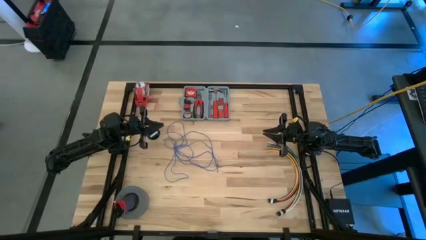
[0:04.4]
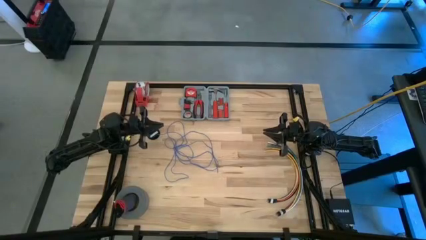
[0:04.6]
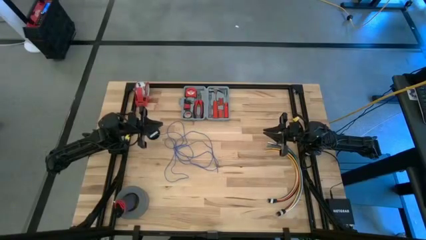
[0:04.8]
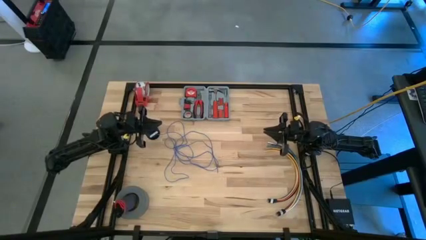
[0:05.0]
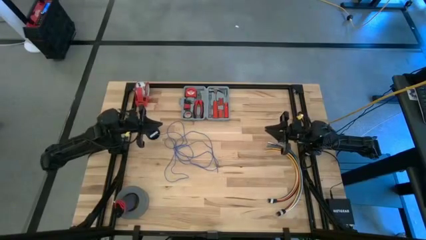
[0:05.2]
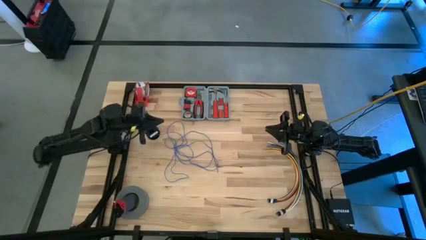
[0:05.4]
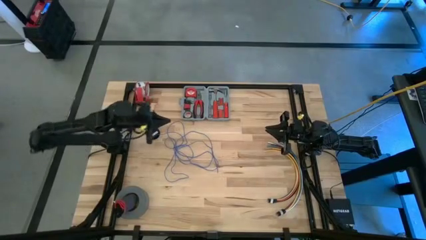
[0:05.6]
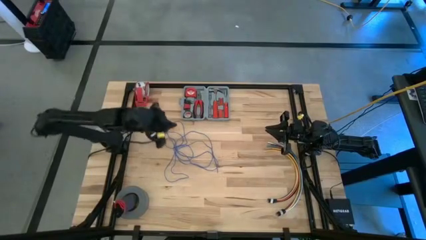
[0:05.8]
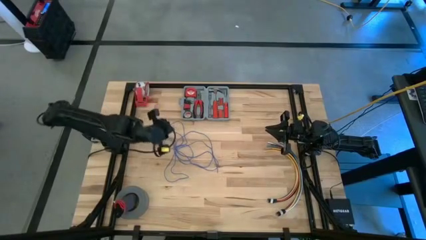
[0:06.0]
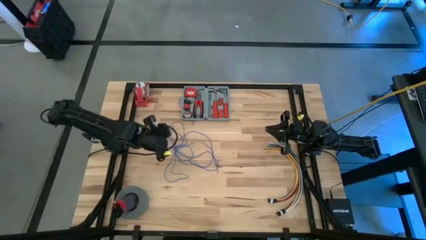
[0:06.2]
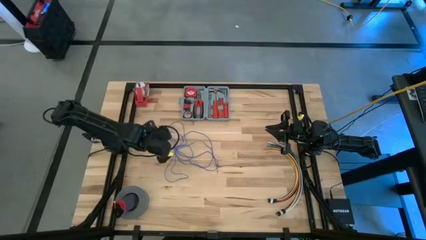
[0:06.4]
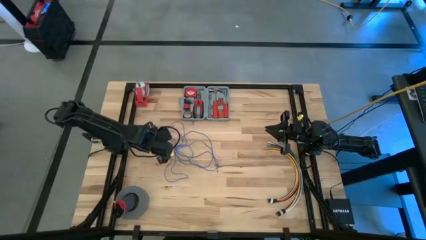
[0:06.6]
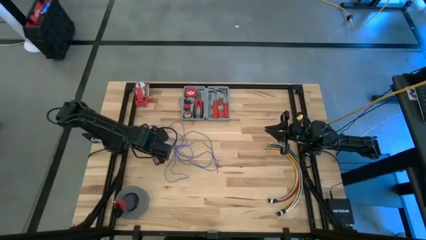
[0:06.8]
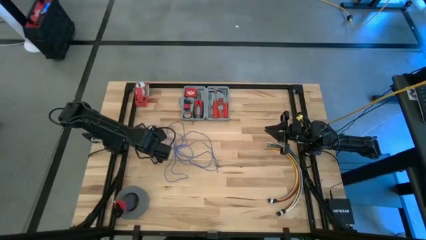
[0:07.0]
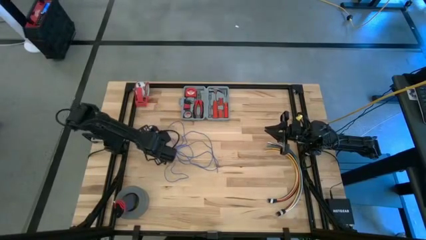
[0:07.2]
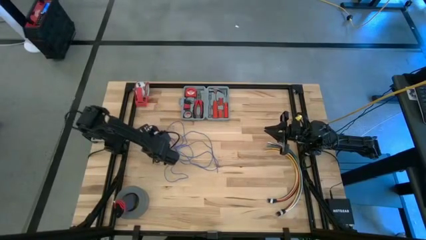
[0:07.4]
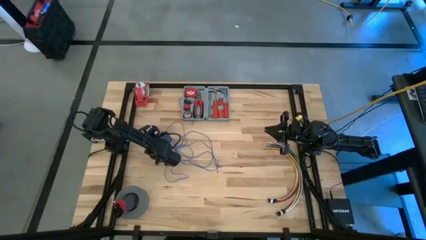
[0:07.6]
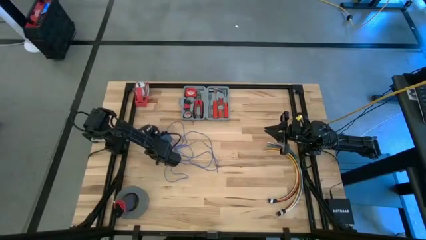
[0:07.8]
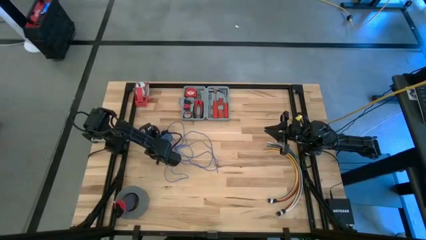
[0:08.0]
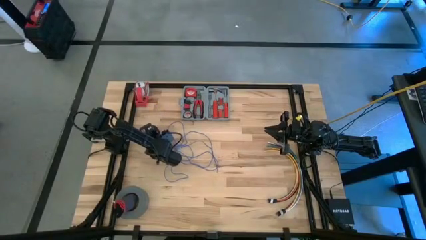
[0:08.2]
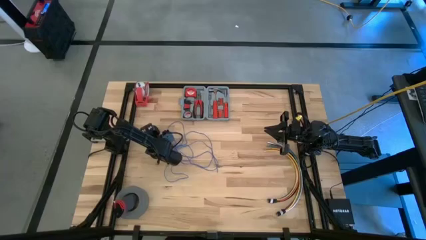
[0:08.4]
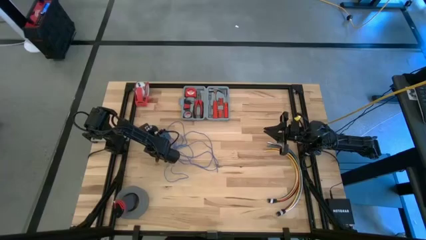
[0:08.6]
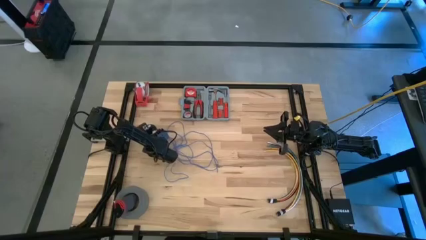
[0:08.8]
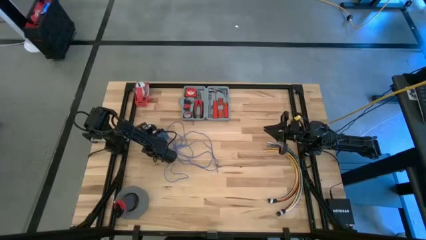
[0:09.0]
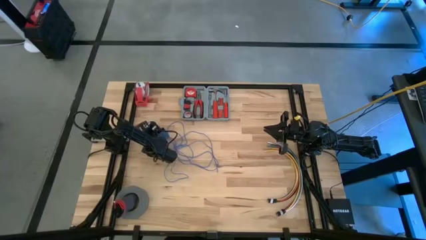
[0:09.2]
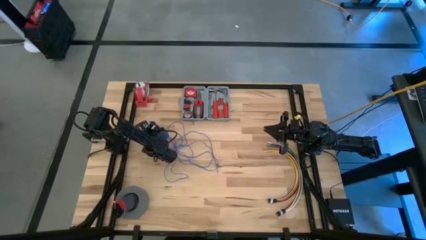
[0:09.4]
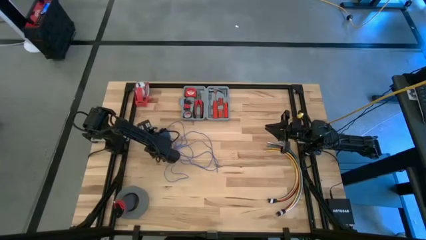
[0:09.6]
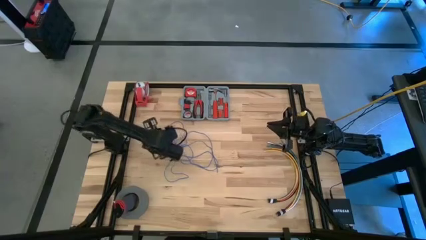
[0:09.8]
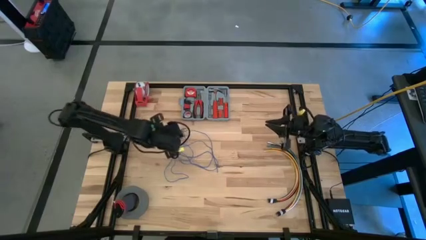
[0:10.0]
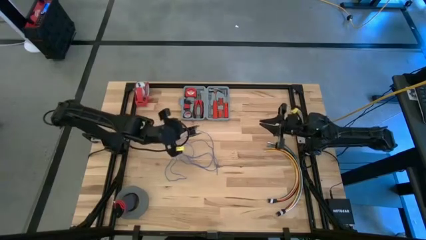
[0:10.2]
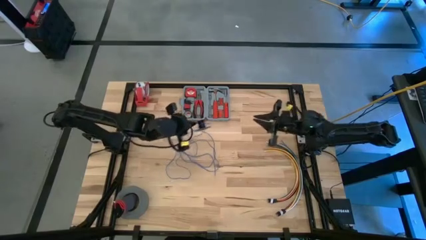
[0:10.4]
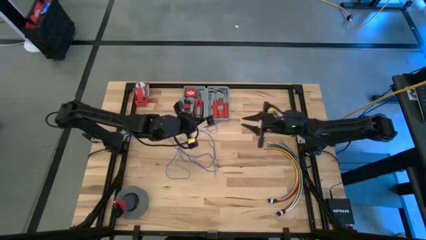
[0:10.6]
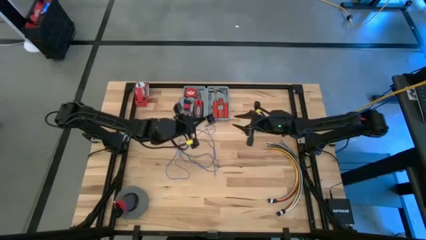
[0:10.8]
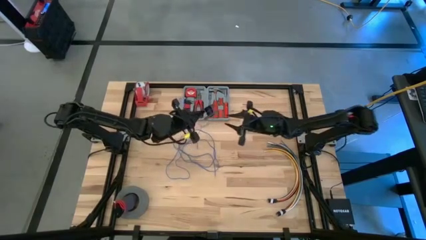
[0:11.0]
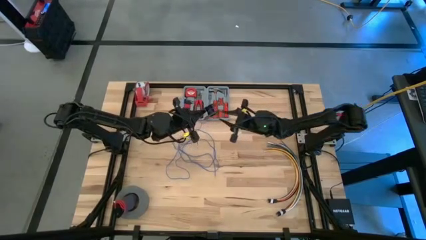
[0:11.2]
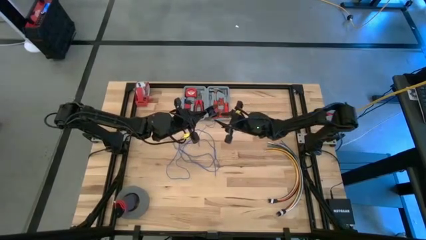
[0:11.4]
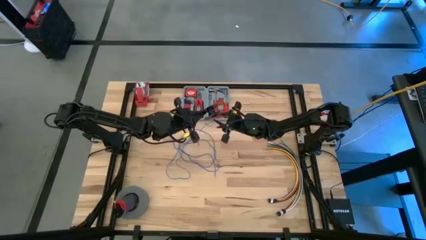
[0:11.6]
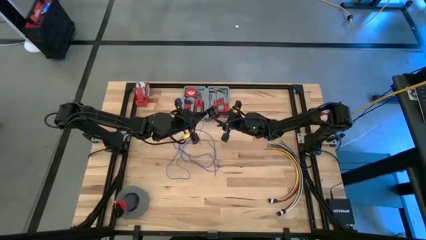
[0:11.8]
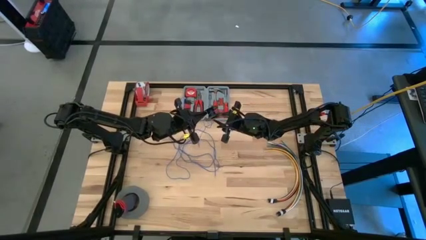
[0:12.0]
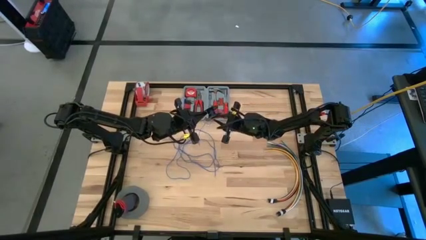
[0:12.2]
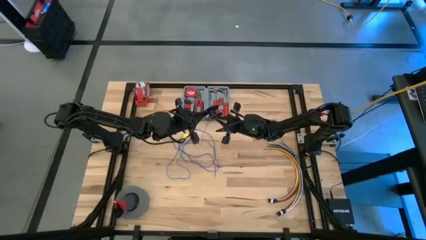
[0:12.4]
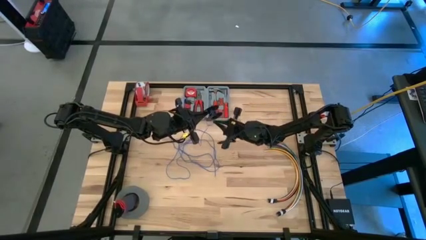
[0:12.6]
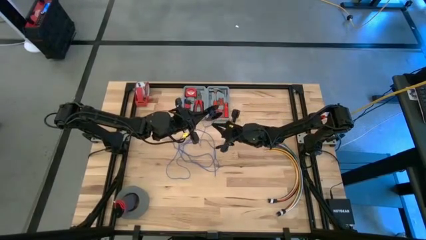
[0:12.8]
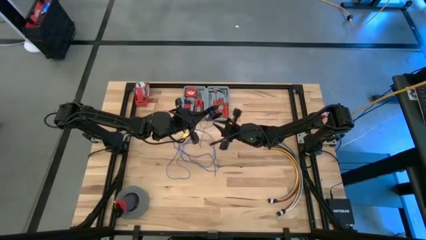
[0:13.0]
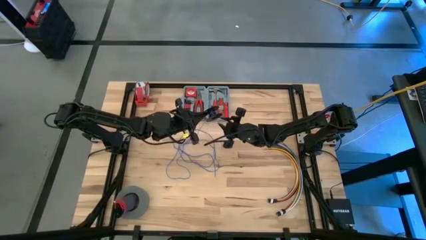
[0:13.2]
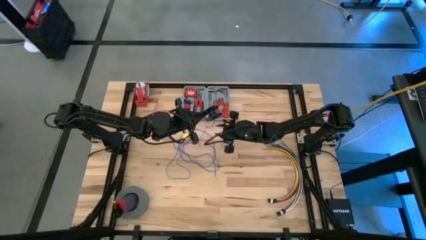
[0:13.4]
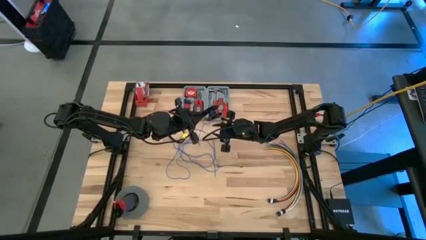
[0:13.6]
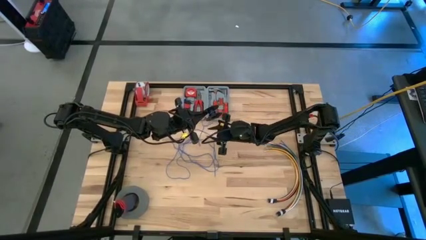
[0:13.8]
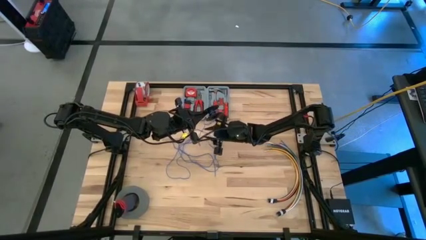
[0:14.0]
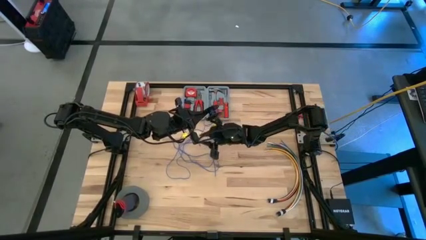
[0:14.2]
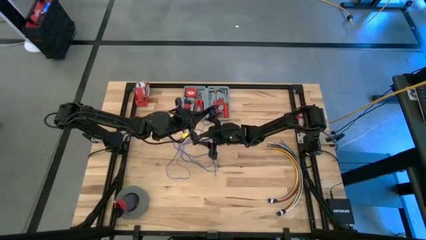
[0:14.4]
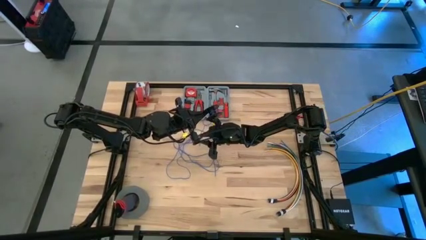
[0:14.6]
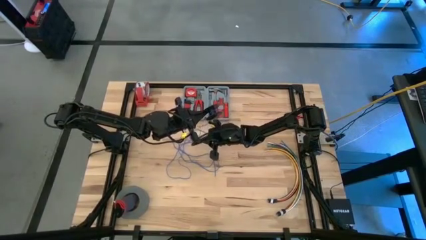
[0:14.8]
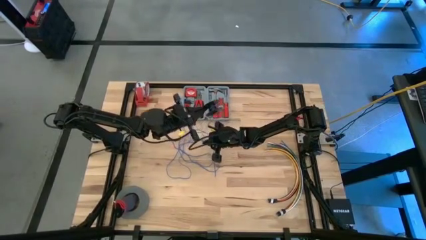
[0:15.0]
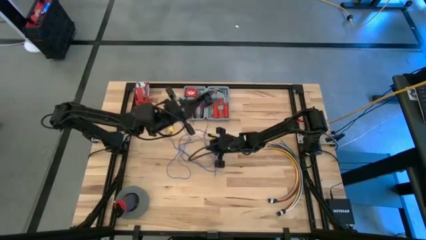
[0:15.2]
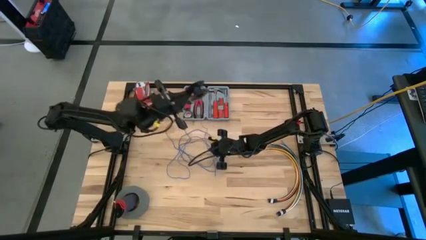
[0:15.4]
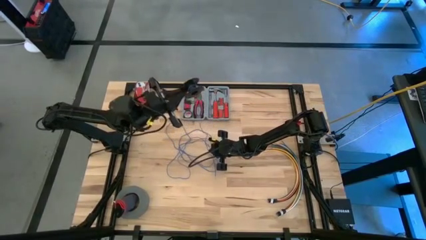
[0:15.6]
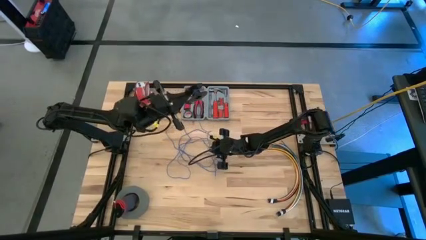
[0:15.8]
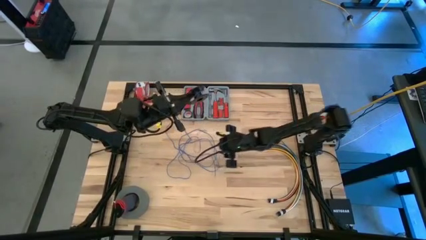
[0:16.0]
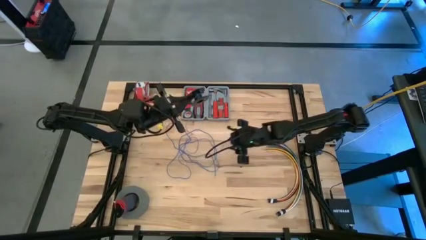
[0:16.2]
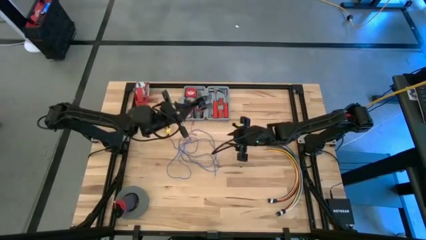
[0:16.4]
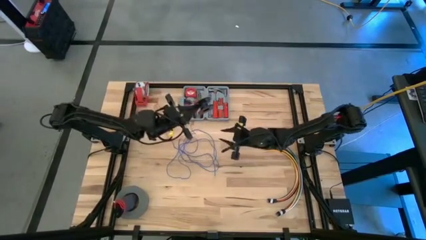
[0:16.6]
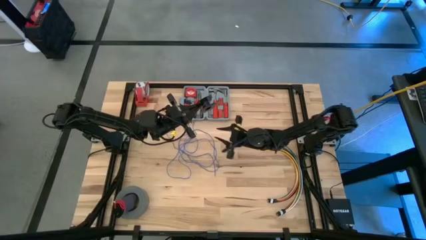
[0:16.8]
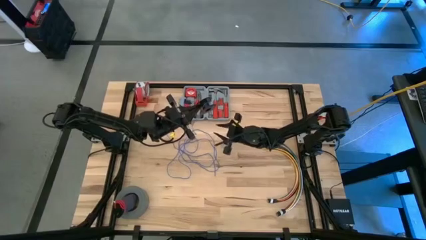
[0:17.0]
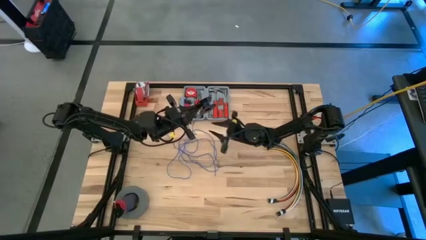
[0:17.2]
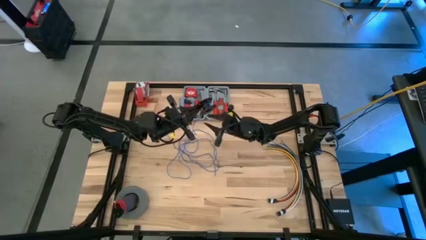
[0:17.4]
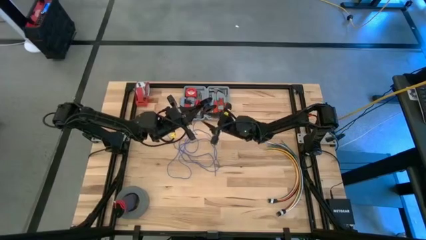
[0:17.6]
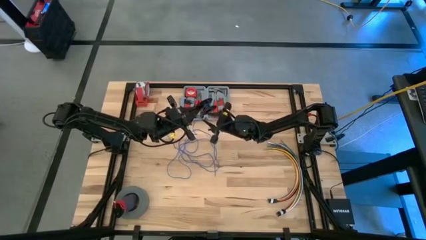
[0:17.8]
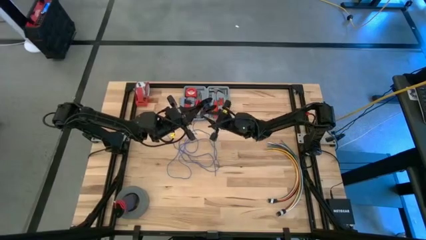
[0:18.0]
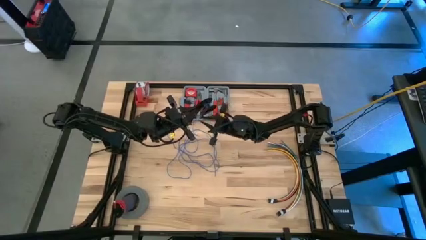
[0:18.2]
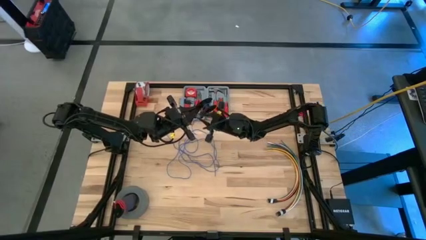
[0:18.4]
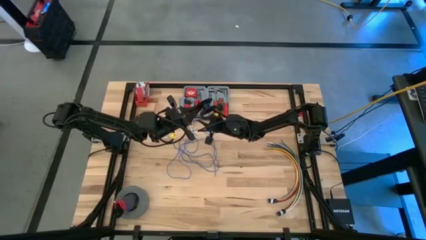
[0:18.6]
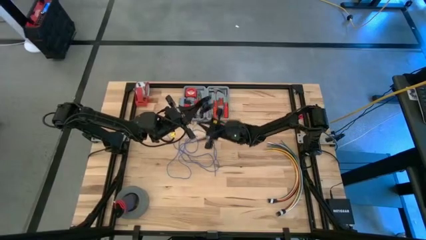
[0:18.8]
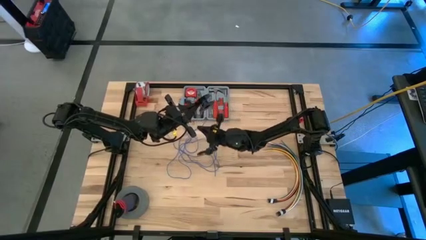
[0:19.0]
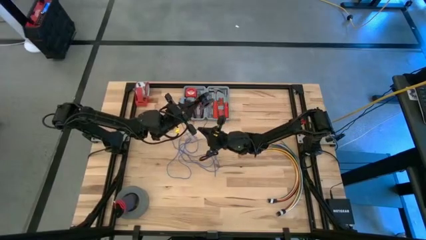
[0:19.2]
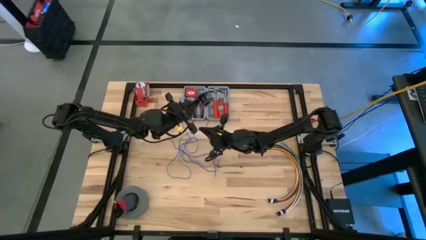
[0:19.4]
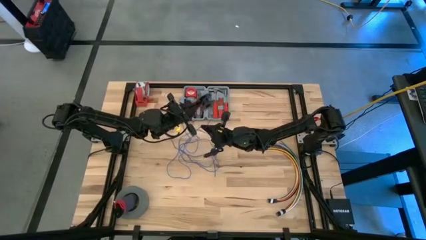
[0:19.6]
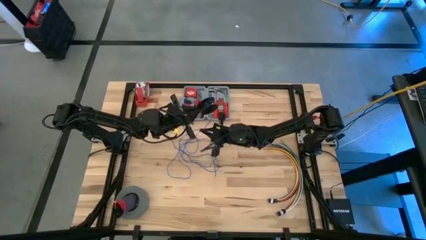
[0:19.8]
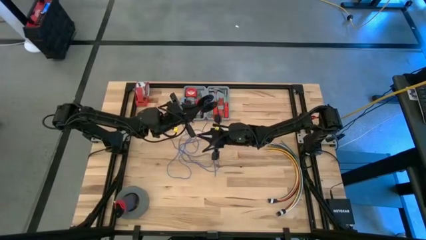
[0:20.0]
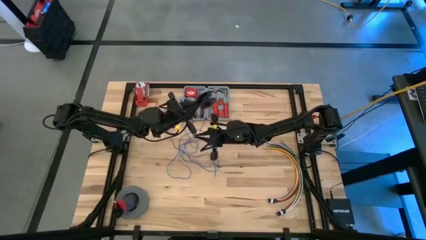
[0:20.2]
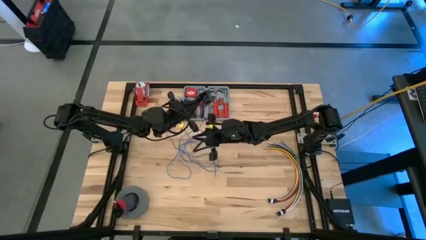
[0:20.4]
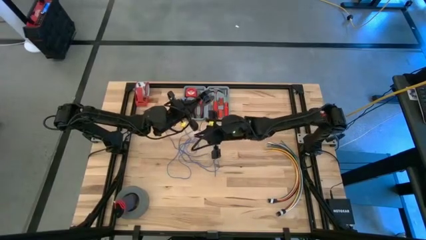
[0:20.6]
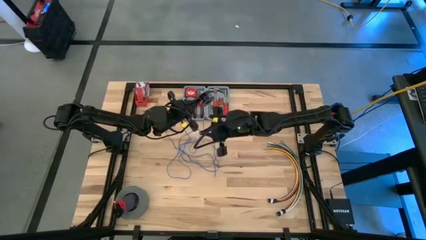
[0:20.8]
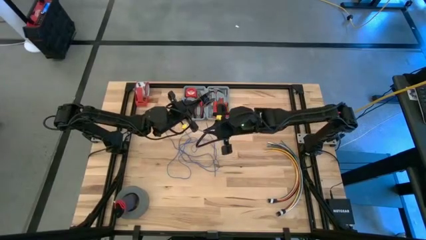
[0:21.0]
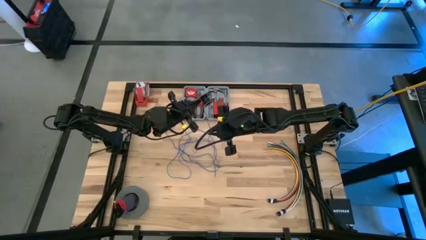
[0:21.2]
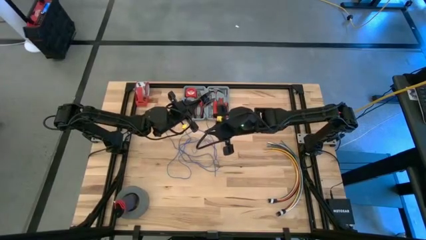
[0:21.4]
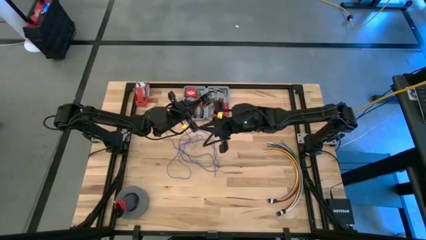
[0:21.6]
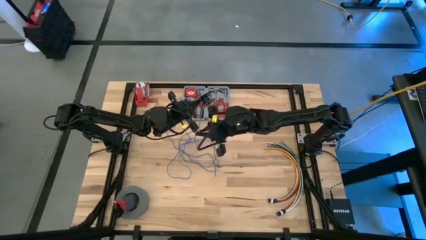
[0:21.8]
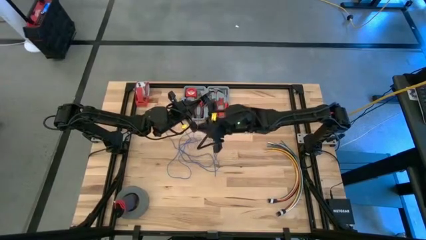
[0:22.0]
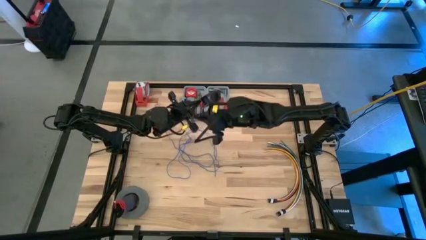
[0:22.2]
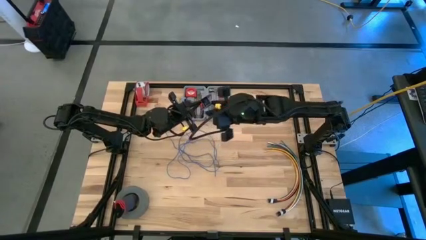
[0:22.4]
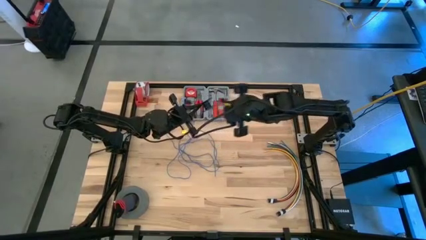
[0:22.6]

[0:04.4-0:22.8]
Task: Coil cords
Coil the blue wire into the black spool
